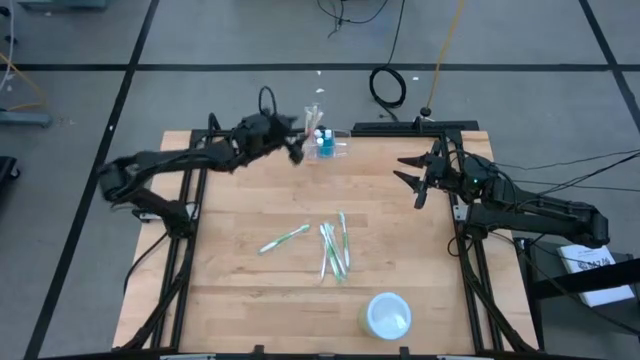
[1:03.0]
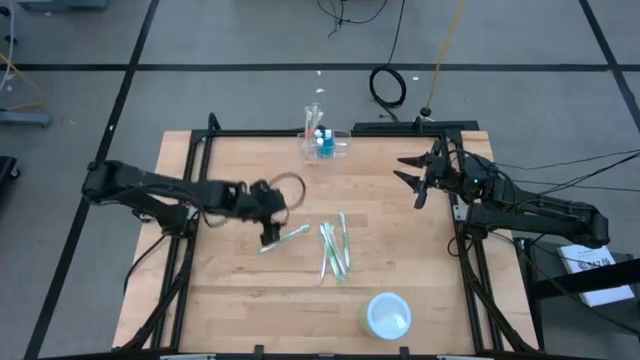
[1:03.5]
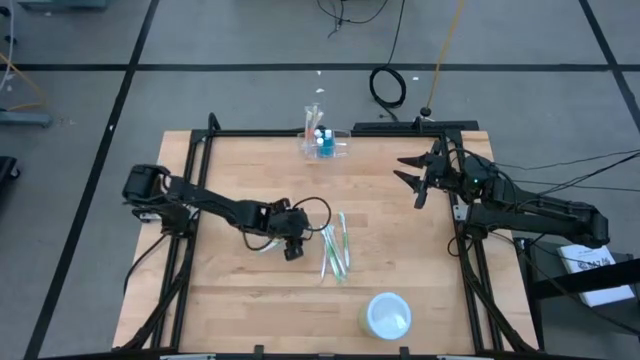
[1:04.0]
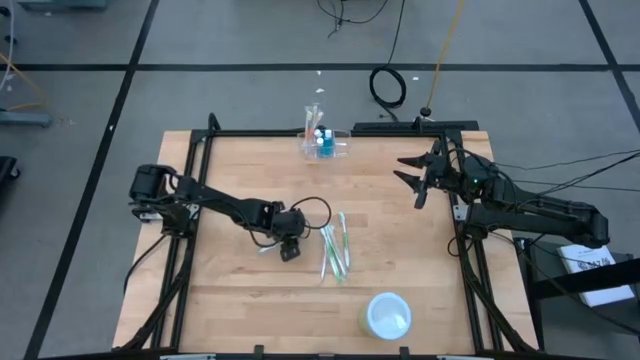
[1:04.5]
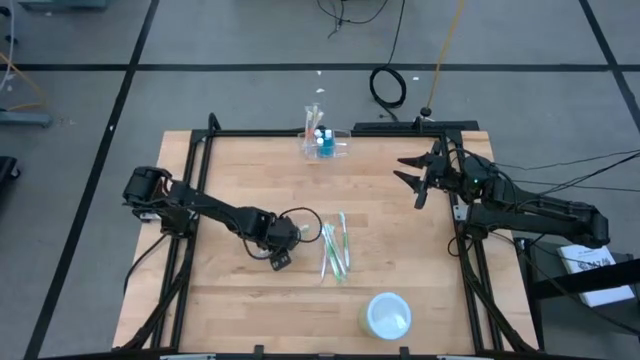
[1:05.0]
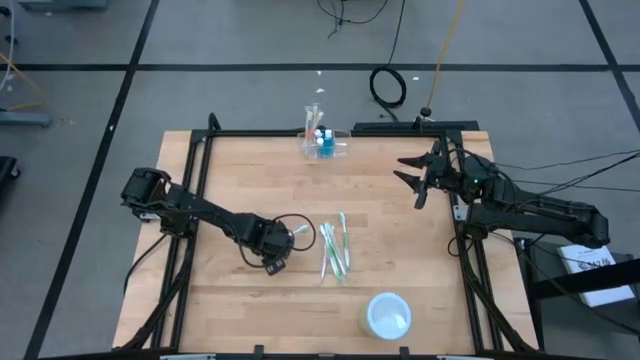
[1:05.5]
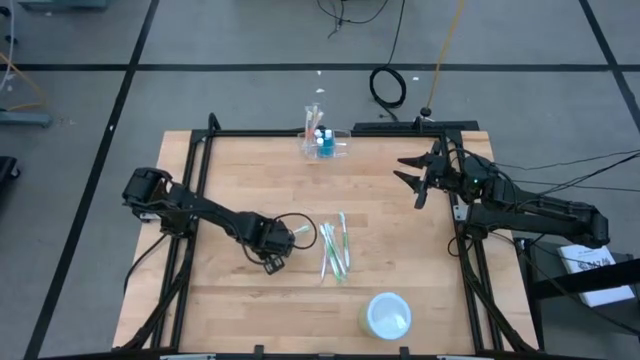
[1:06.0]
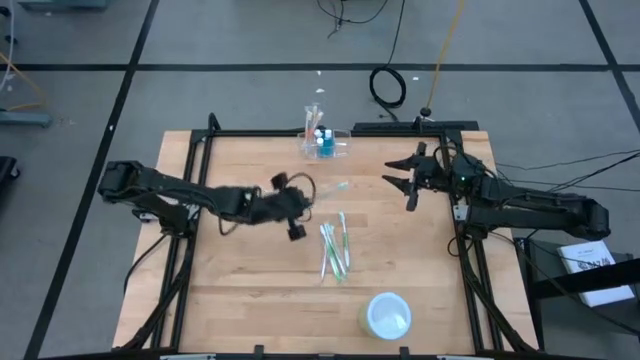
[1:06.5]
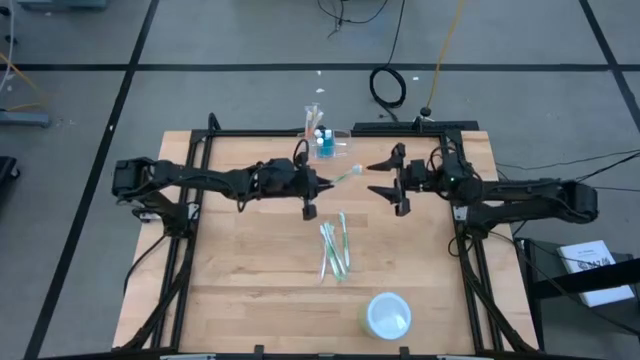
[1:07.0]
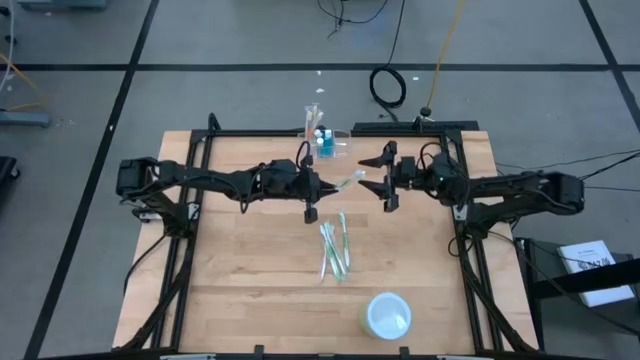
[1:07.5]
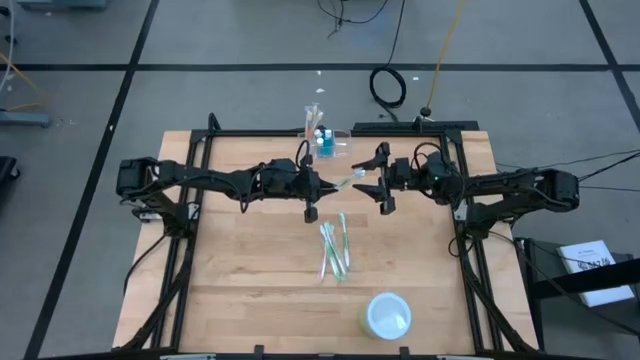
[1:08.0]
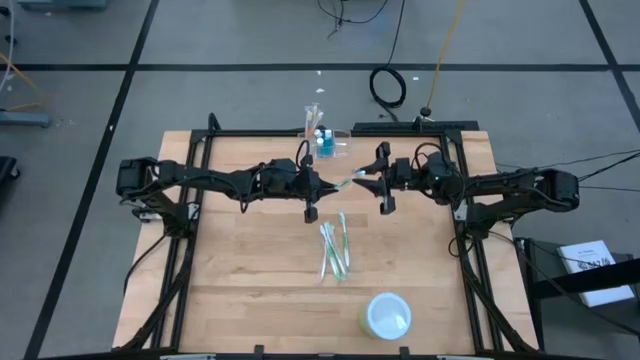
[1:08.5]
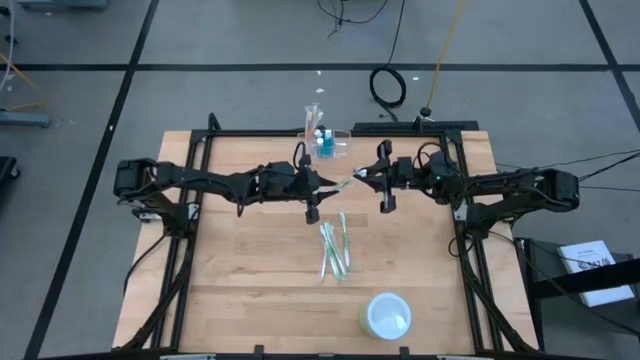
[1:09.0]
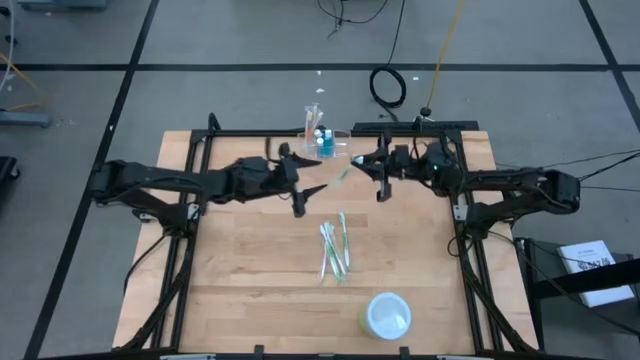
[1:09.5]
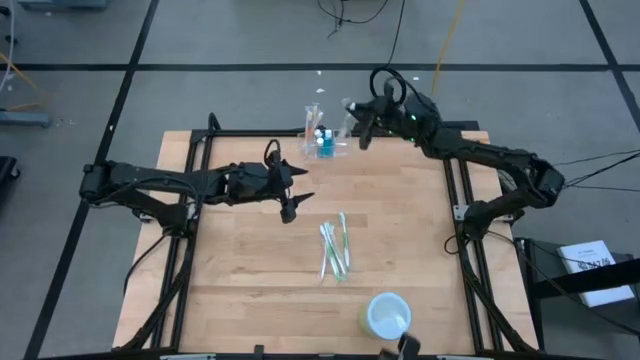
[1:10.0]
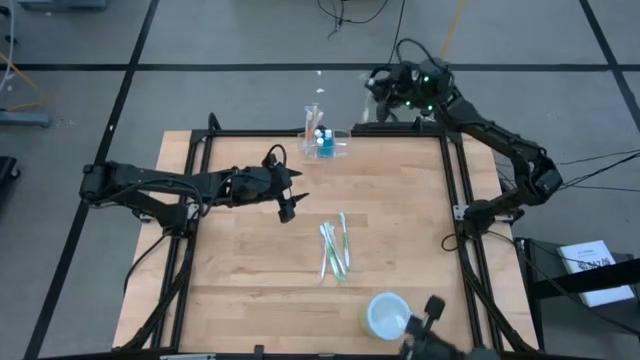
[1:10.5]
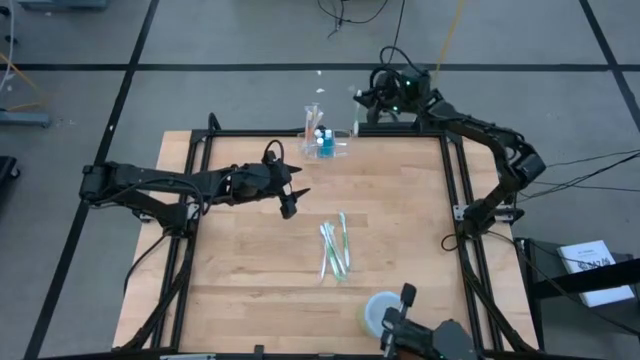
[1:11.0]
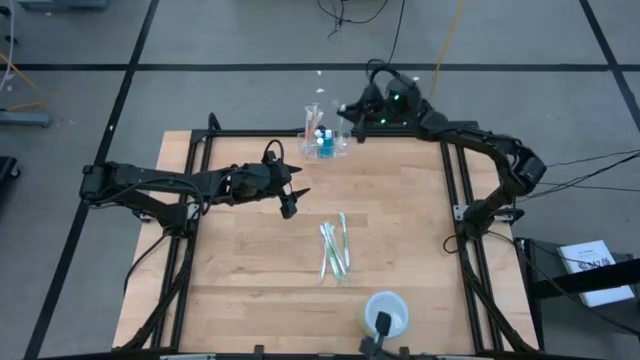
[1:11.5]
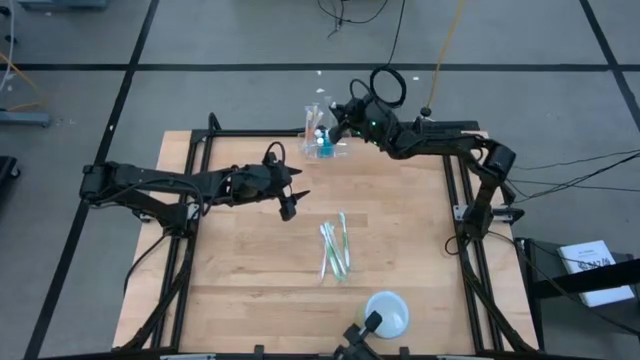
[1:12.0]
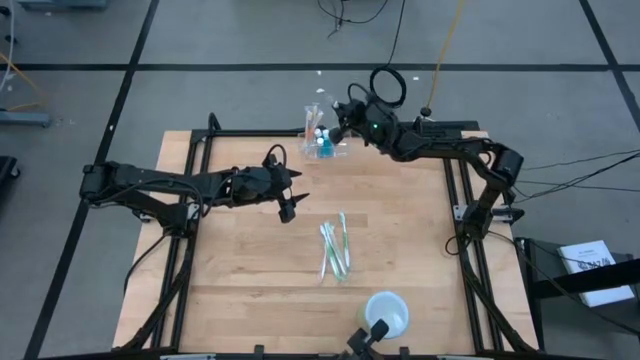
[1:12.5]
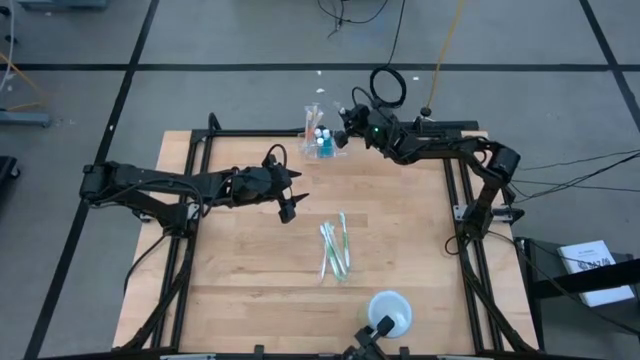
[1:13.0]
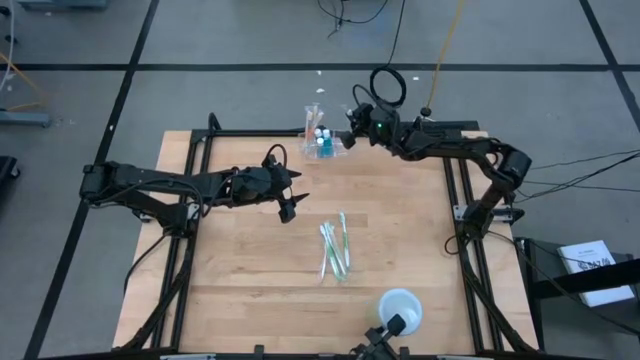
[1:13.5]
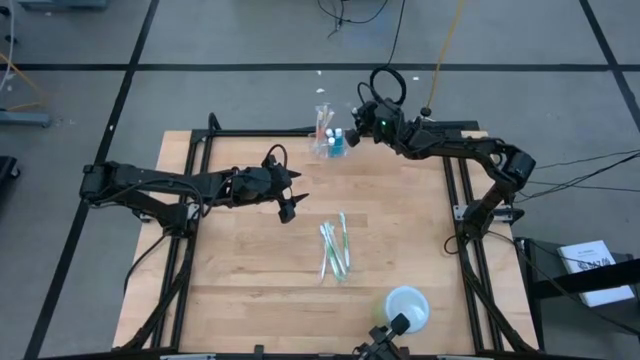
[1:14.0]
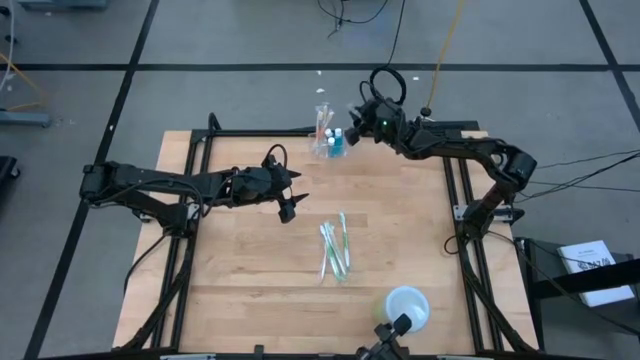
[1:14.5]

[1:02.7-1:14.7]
Task: Pick & Place toothbrushing station
Put the green toothbrush into the transparent organizer

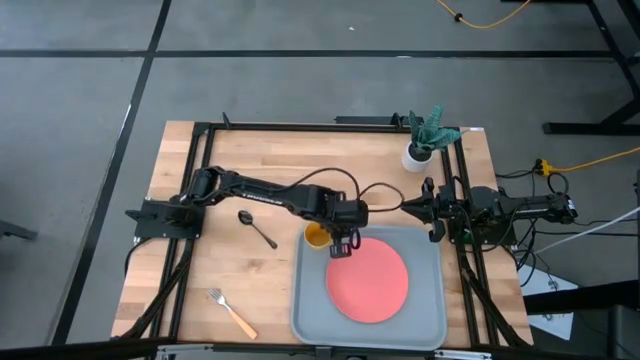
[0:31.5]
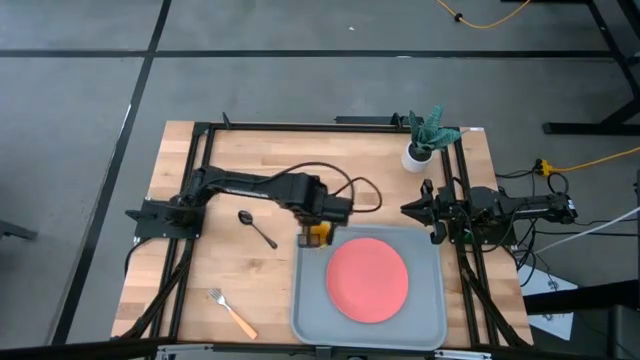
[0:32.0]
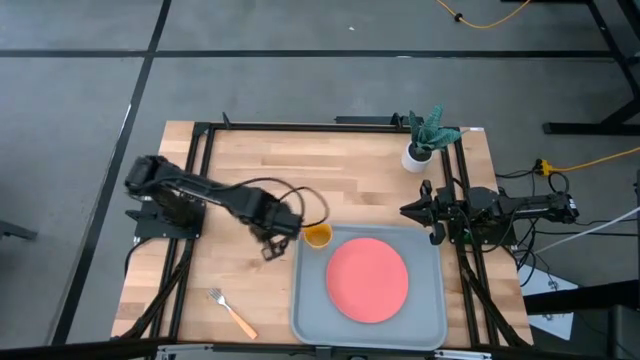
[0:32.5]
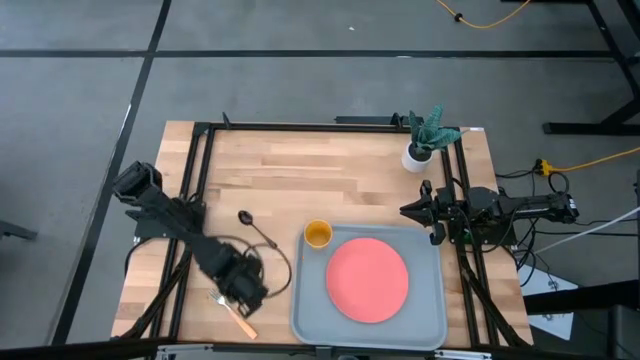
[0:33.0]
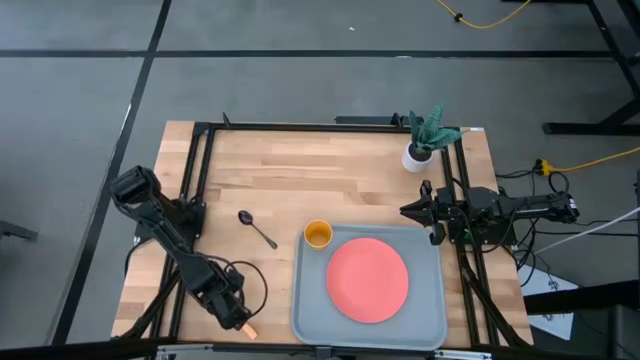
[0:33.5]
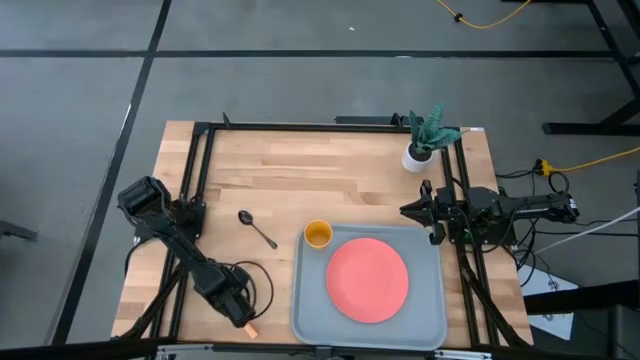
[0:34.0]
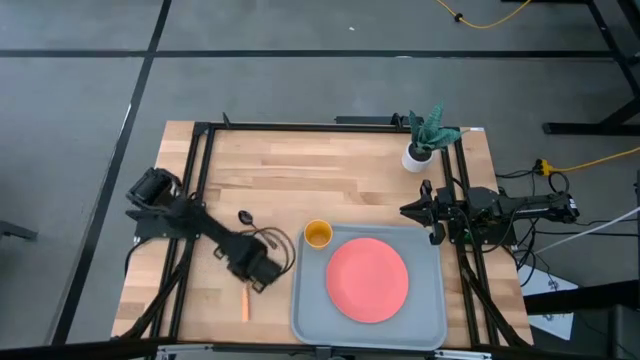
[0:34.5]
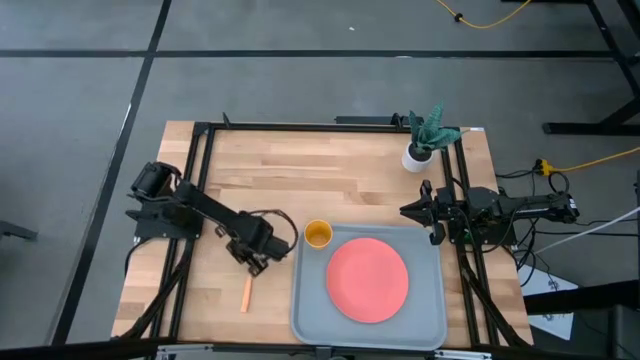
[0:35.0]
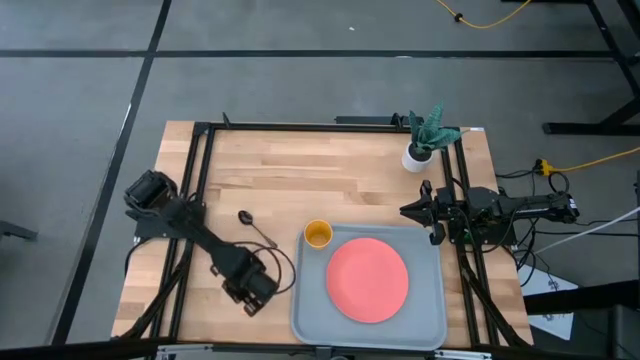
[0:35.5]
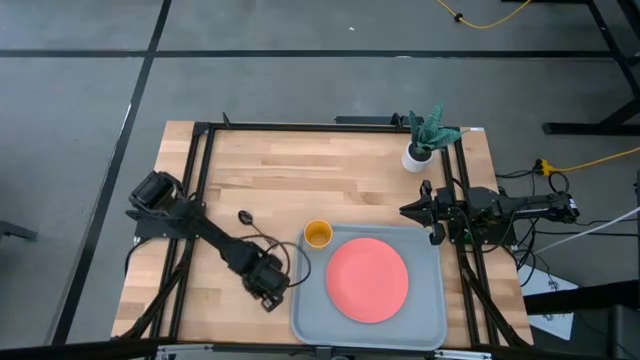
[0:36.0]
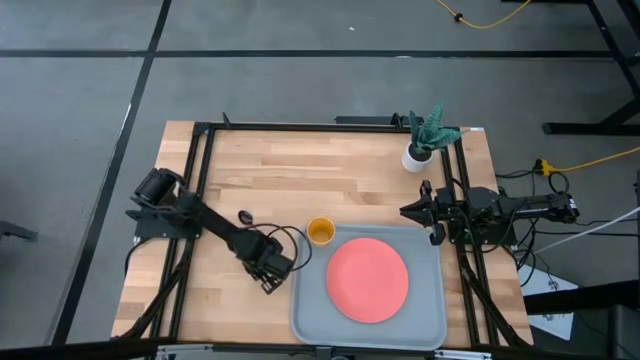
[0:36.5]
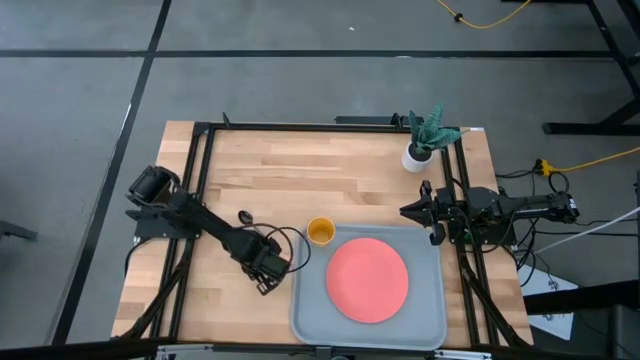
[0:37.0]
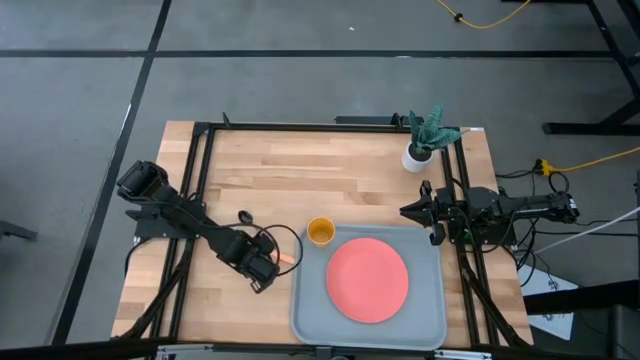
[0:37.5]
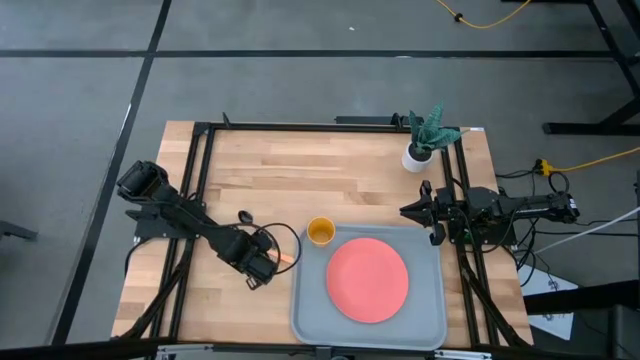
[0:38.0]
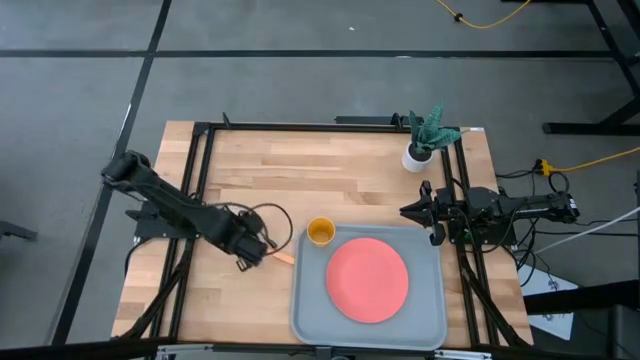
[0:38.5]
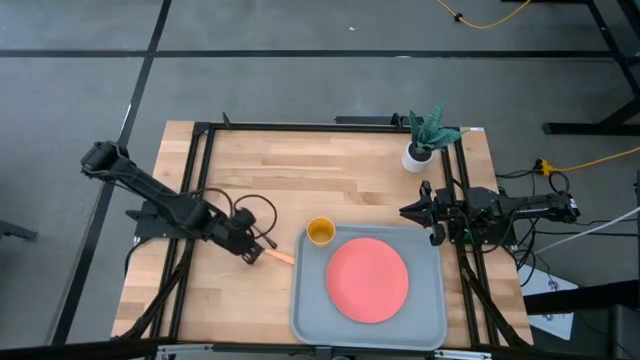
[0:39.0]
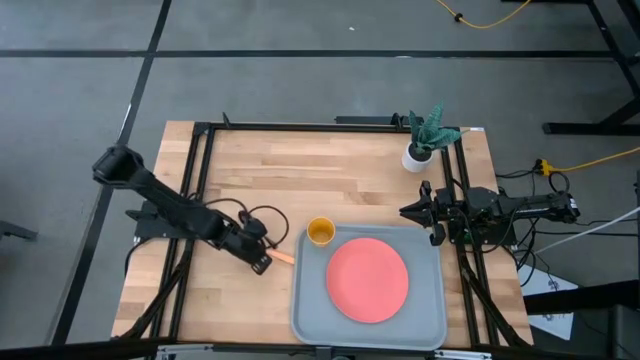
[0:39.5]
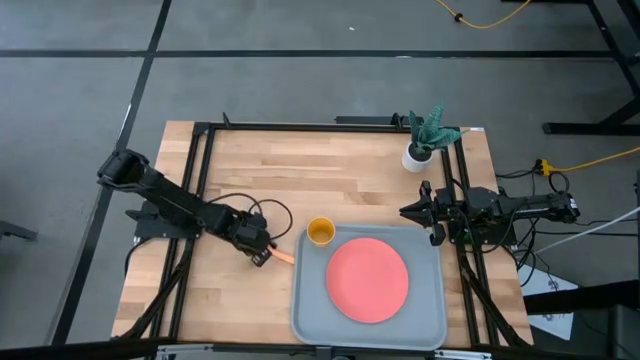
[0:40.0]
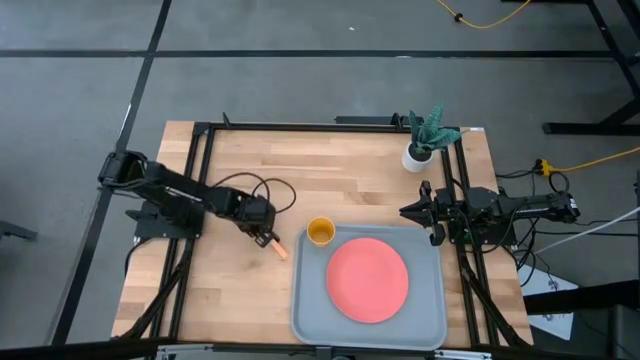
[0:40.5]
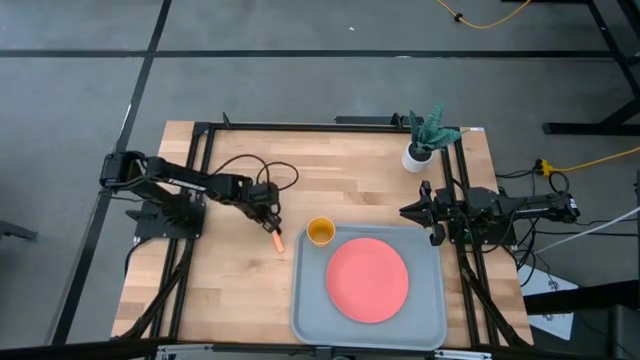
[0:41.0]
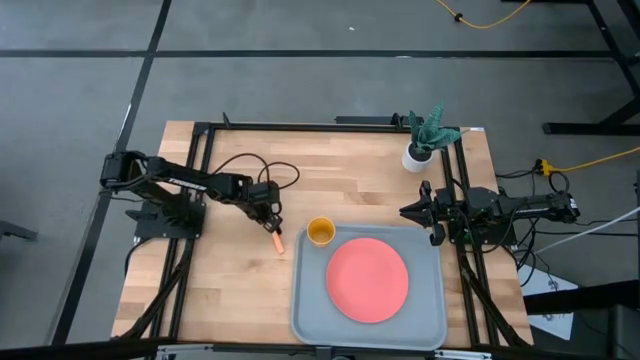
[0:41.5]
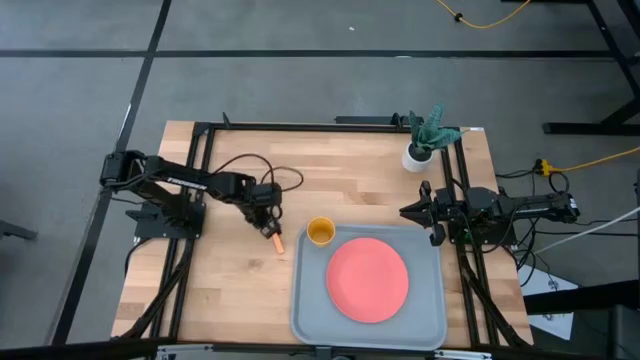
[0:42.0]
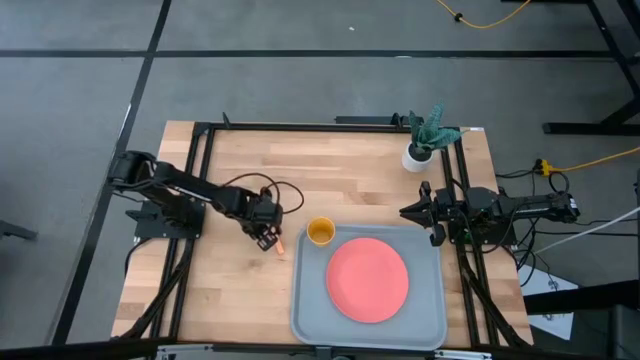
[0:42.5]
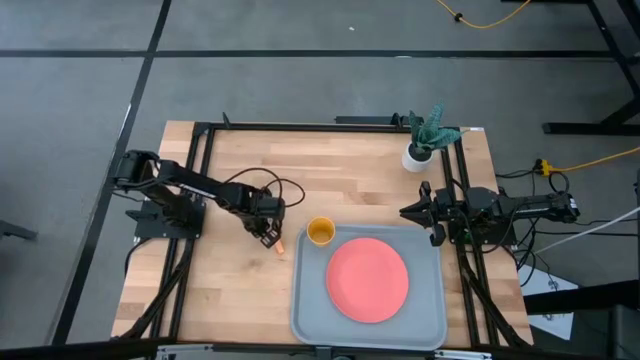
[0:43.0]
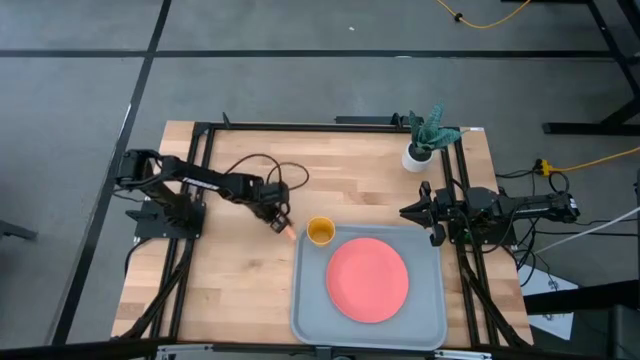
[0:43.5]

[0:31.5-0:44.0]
Task: Pick and place plate/cup/fork/spoon on tray
Move the orange fork and black spoon to the middle of the table
